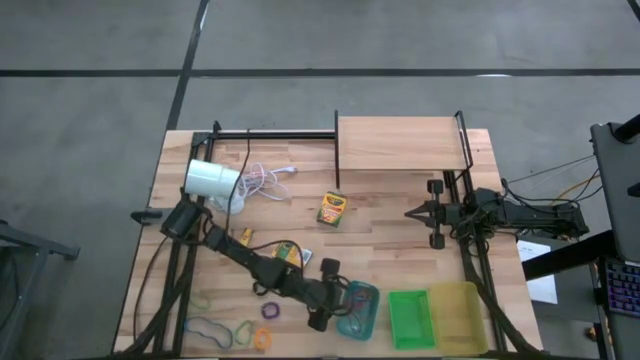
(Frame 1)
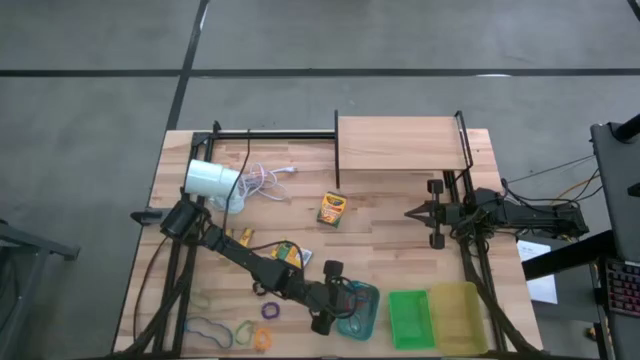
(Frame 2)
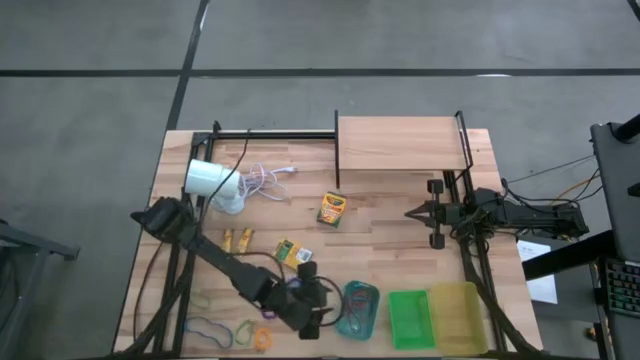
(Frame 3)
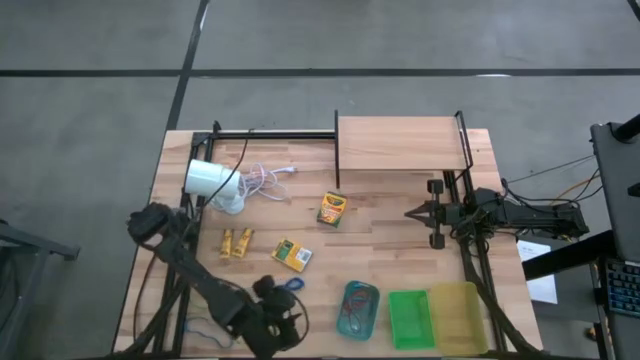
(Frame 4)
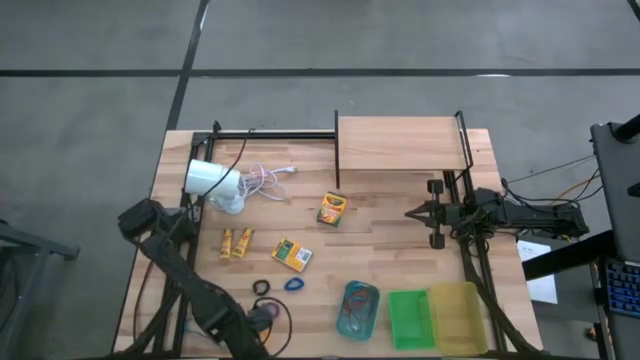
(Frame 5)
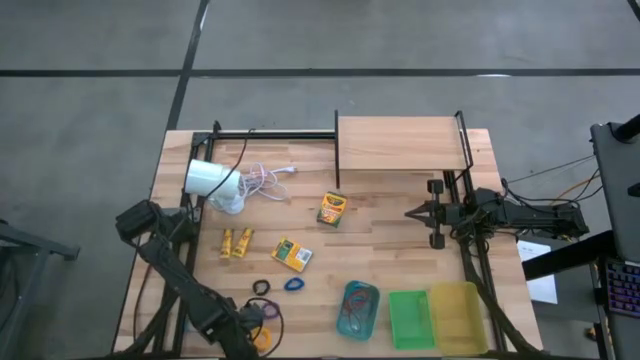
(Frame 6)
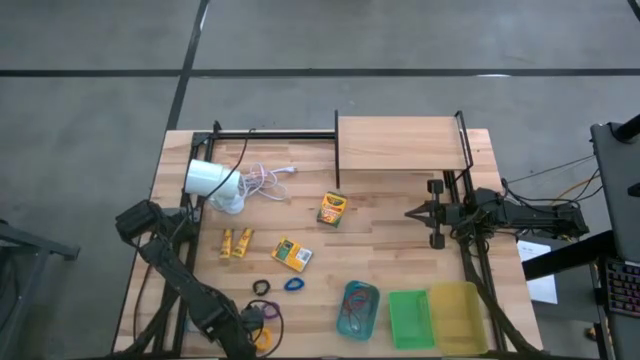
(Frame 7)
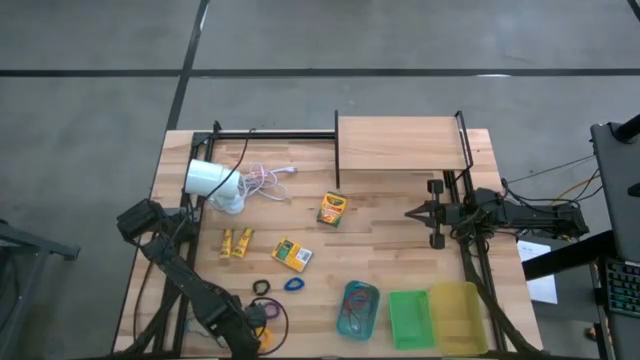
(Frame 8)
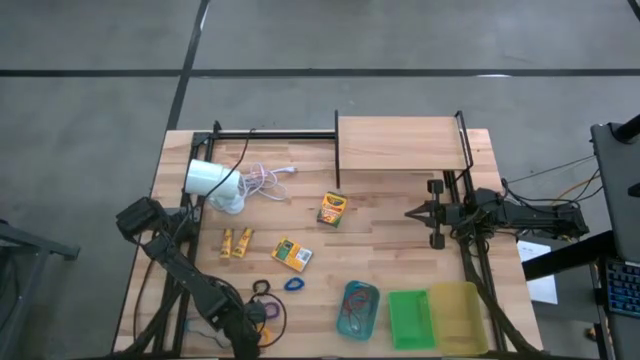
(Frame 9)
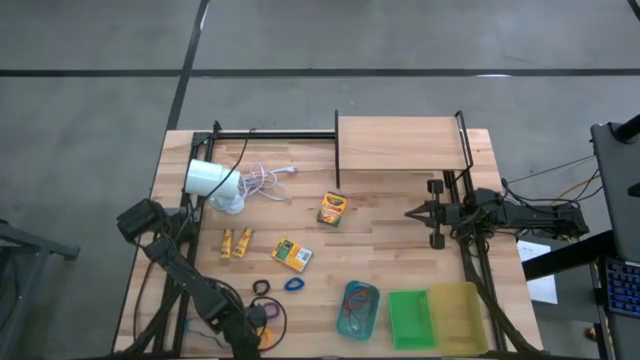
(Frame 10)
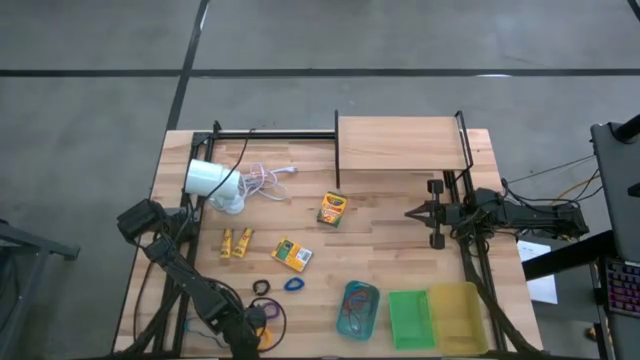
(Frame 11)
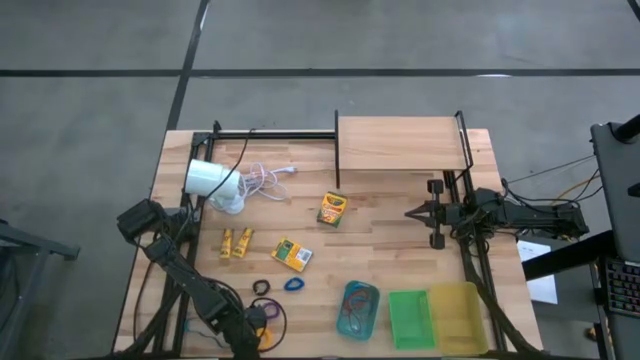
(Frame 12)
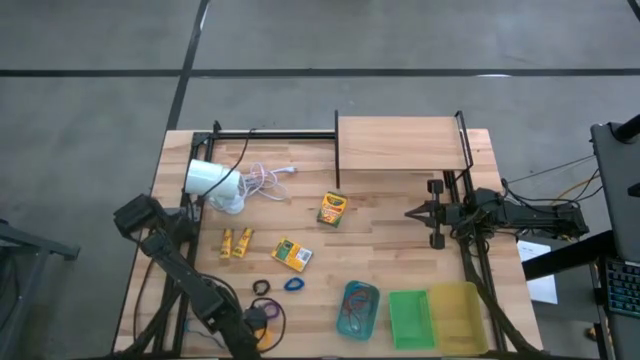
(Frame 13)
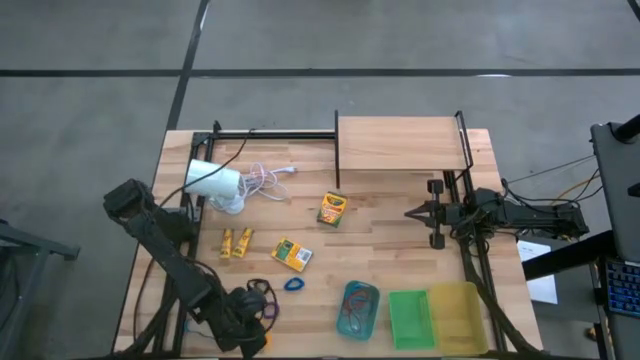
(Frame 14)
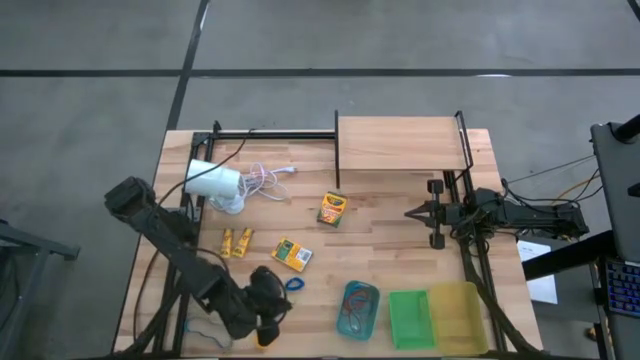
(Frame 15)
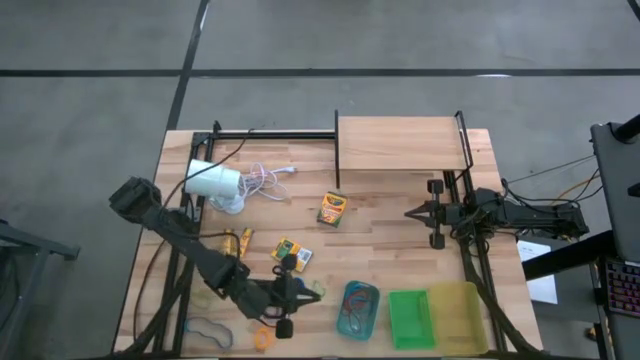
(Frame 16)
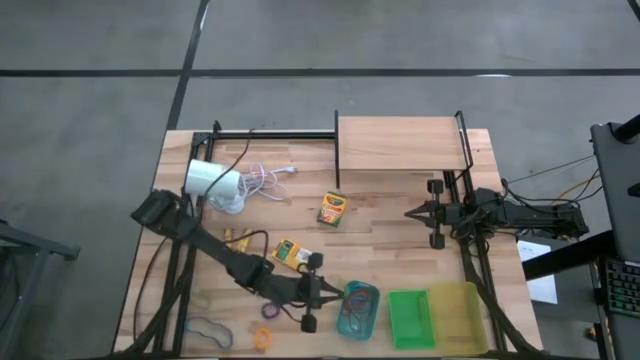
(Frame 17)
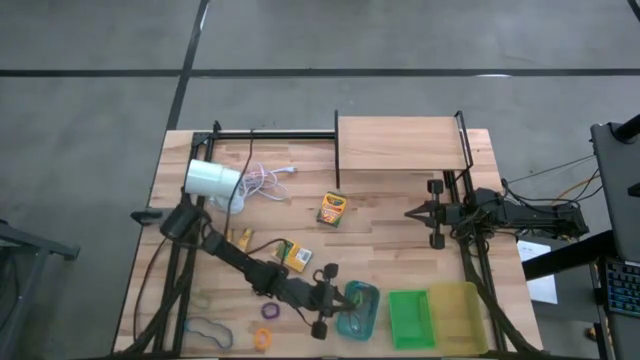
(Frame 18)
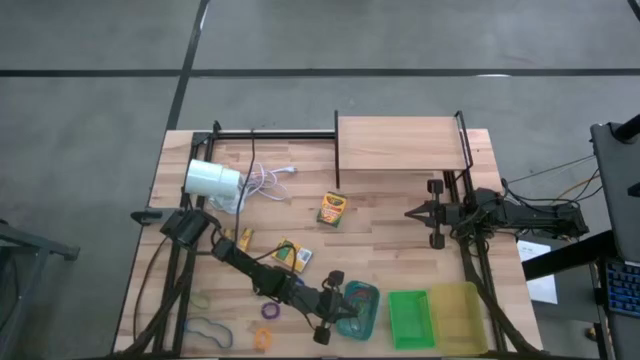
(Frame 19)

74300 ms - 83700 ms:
Task: Pick & Place Office Desk Supplies
Put the green rubber band into the blue bin

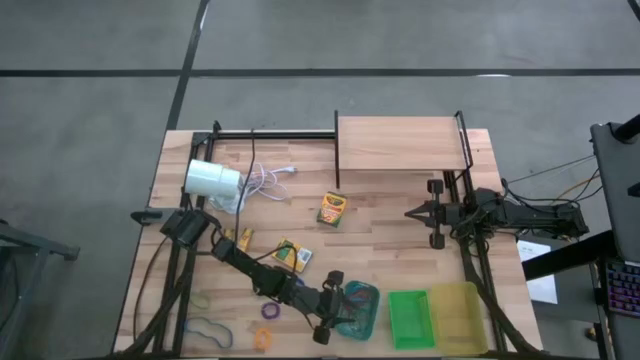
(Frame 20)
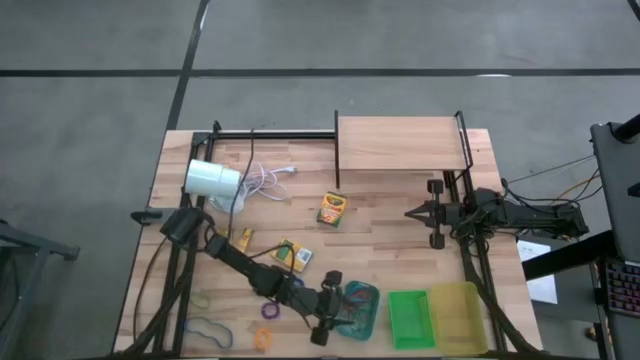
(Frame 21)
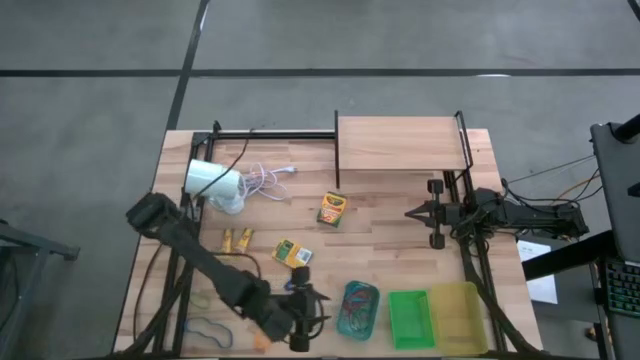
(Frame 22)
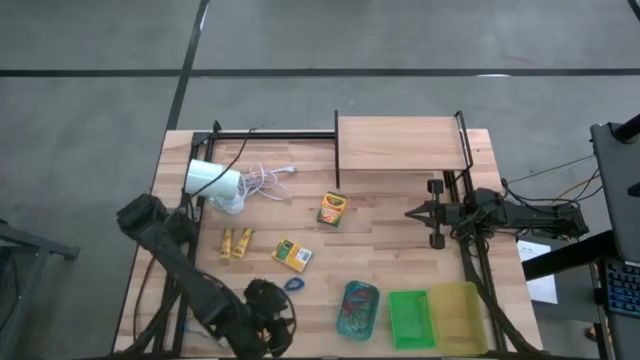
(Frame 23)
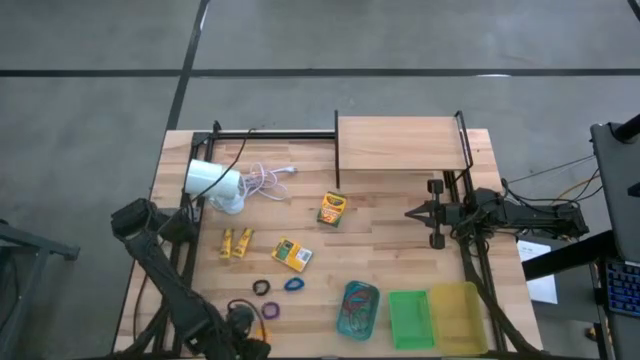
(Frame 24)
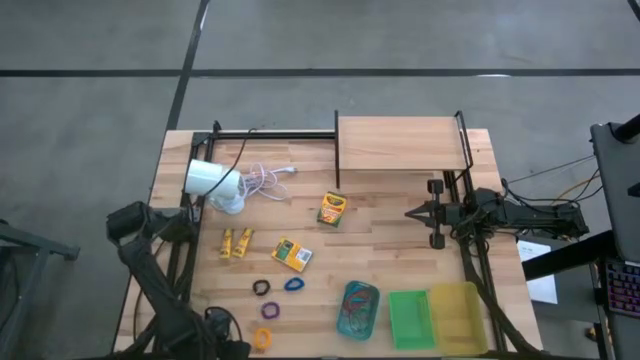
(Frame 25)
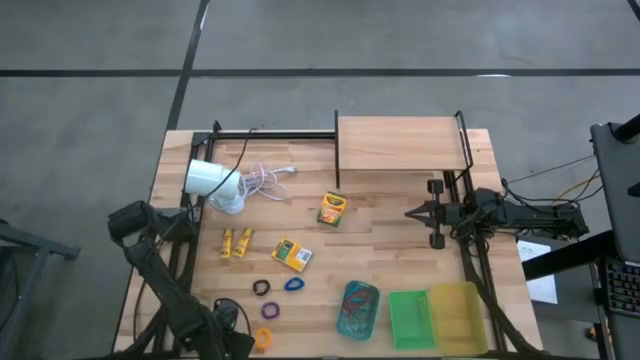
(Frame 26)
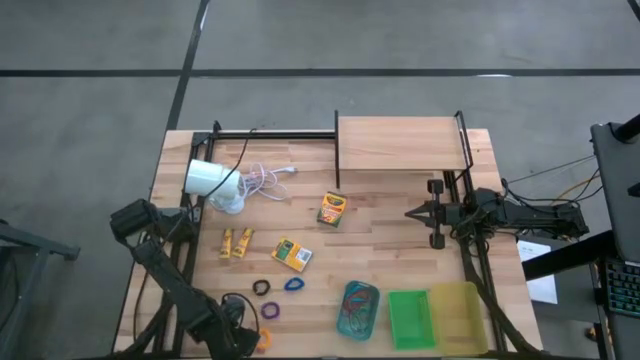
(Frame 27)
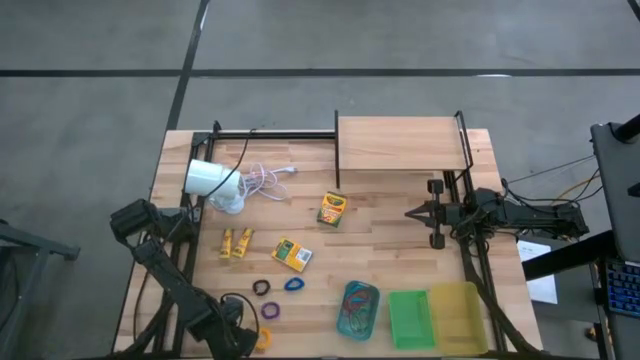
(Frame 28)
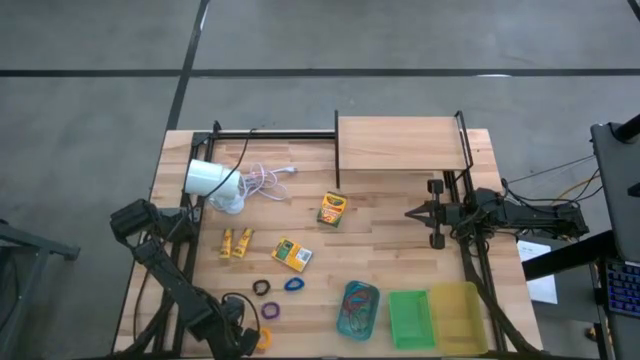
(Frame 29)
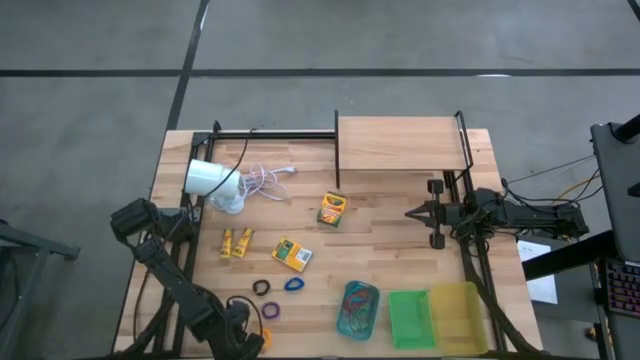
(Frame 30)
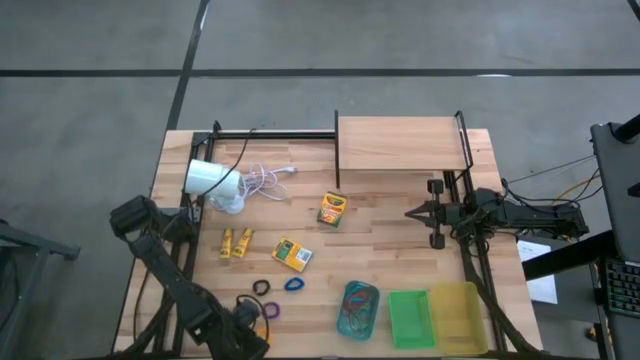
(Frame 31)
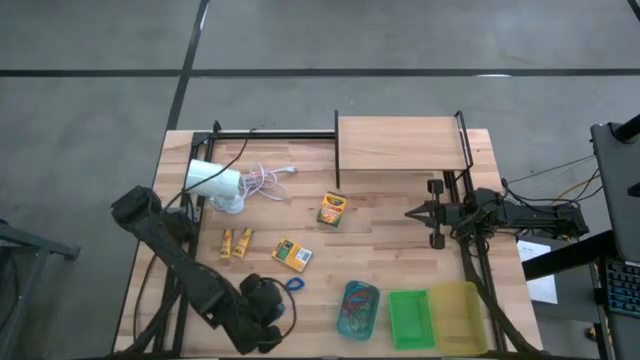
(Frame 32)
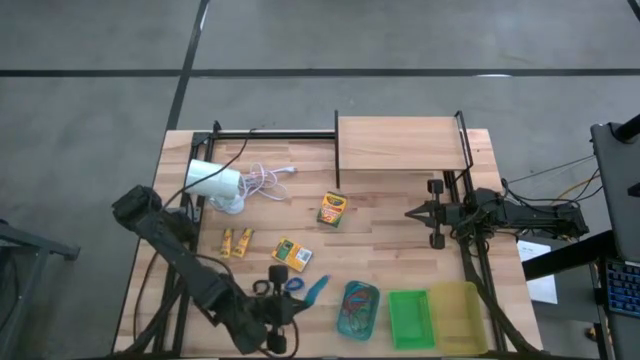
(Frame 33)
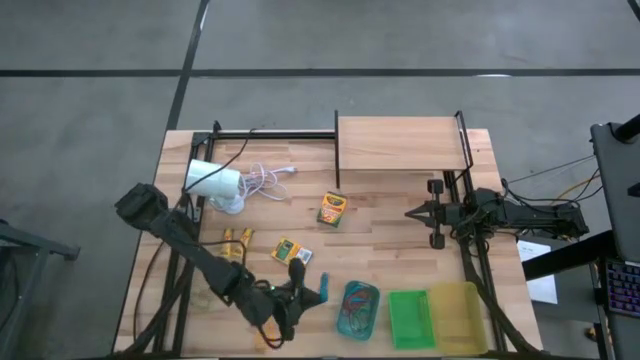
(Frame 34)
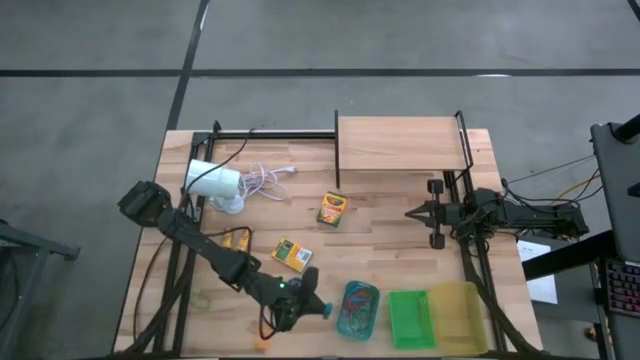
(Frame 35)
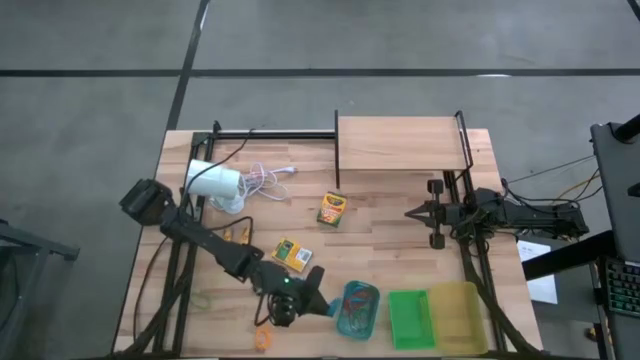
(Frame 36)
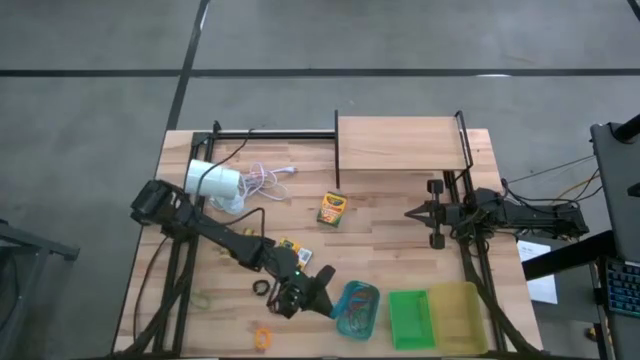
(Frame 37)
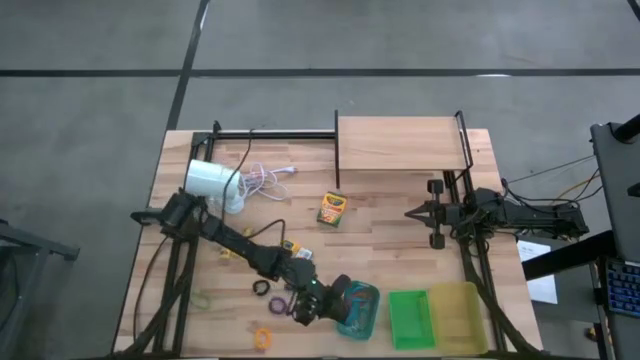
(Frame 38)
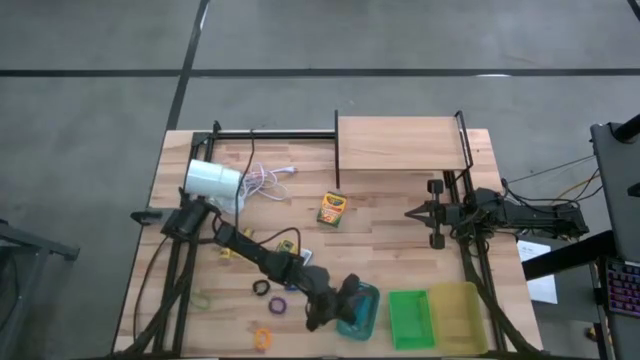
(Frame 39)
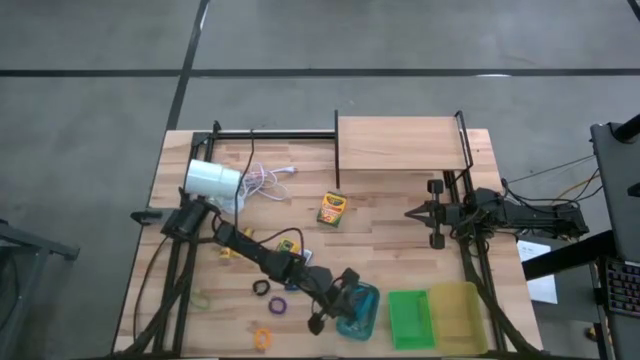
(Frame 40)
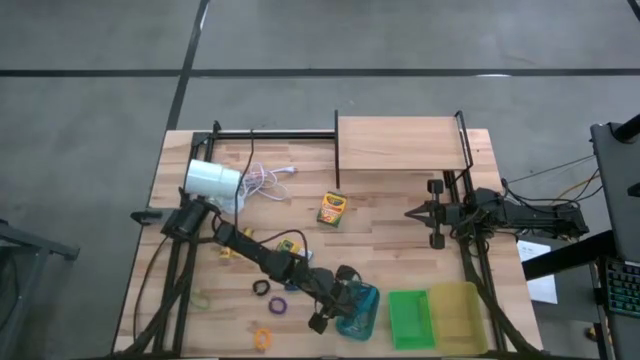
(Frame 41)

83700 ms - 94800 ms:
Put the blue rubber band into the blue bin

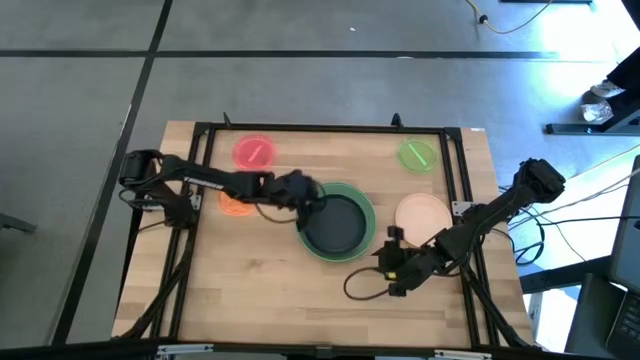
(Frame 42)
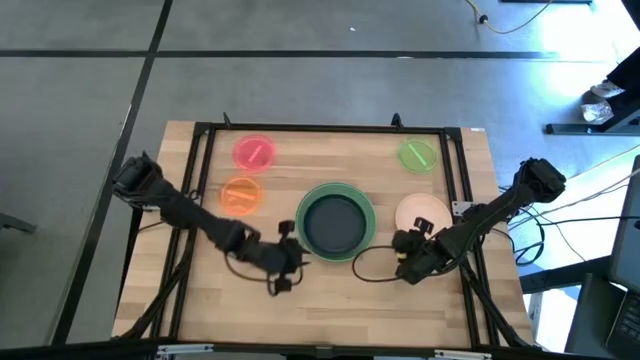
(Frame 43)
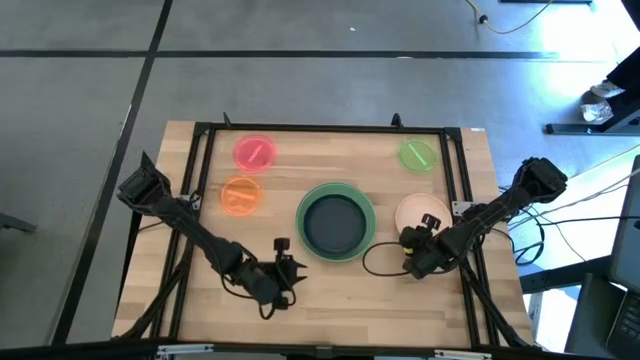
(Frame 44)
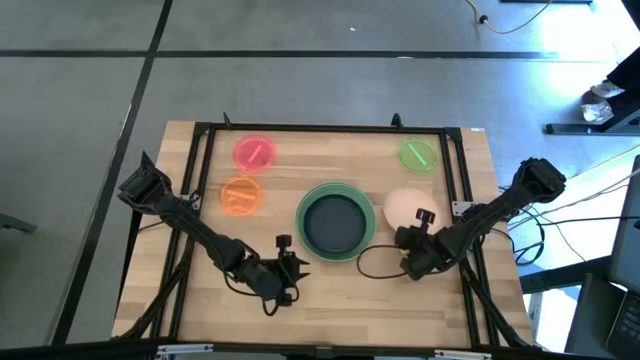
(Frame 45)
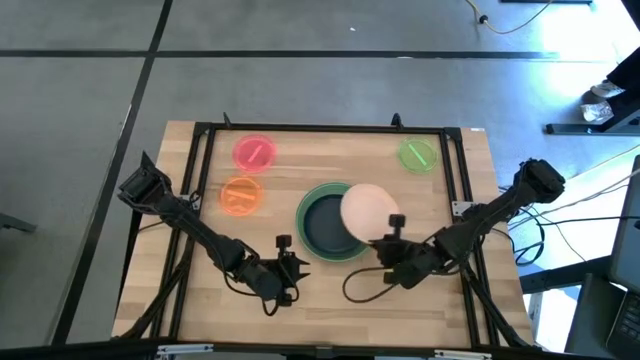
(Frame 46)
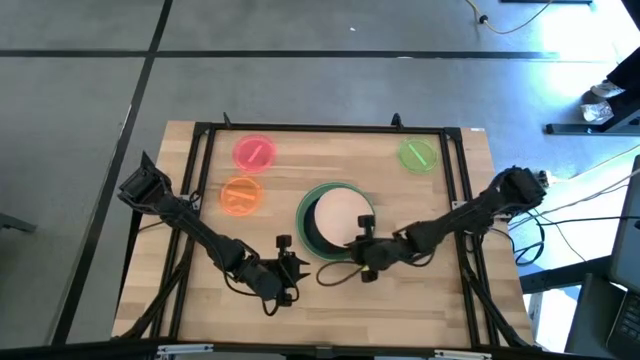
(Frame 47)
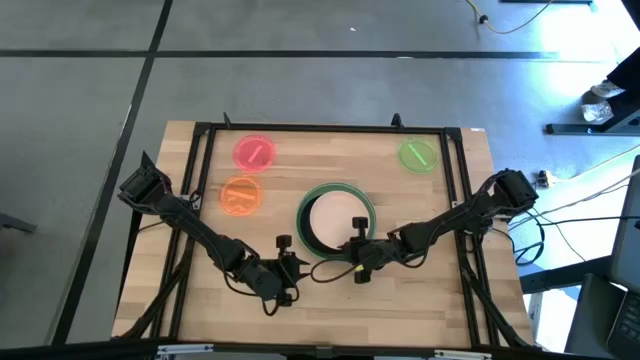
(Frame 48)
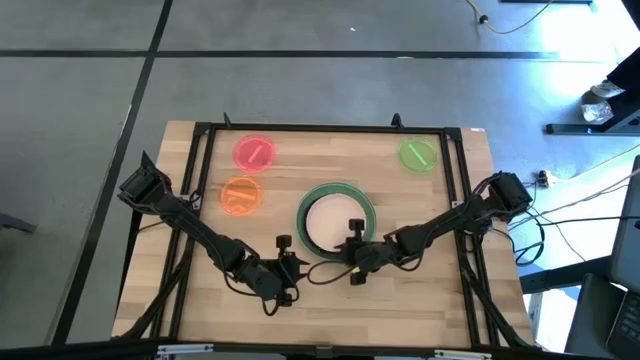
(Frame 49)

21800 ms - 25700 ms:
Task: Stack plastic plates
Stack the white plate on top of the dark blue plate
